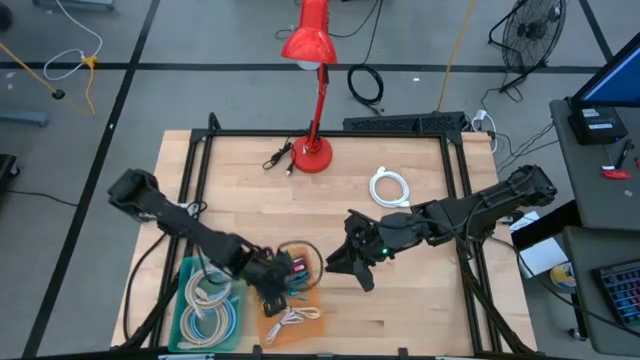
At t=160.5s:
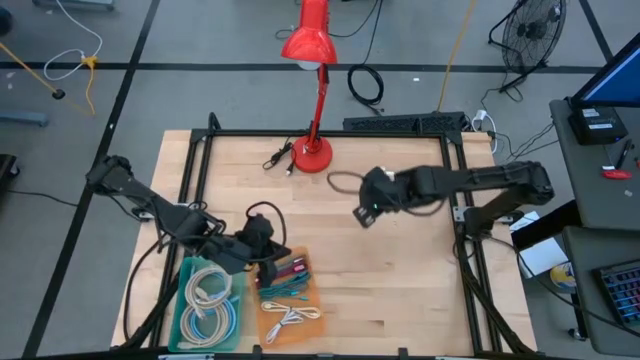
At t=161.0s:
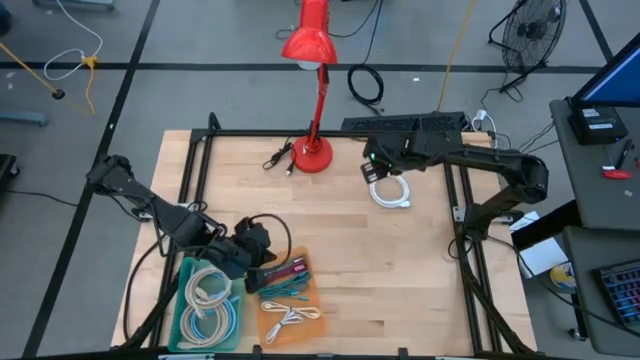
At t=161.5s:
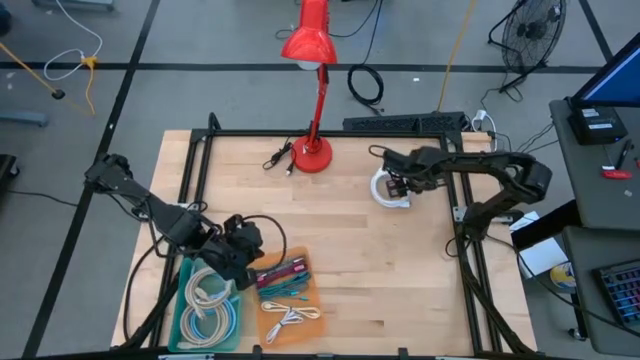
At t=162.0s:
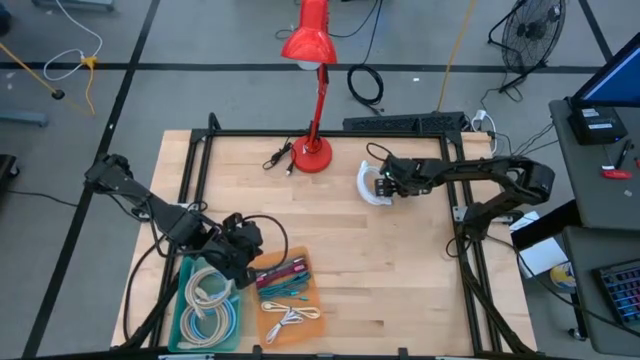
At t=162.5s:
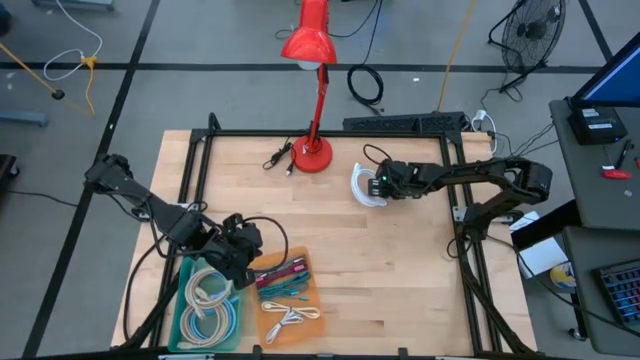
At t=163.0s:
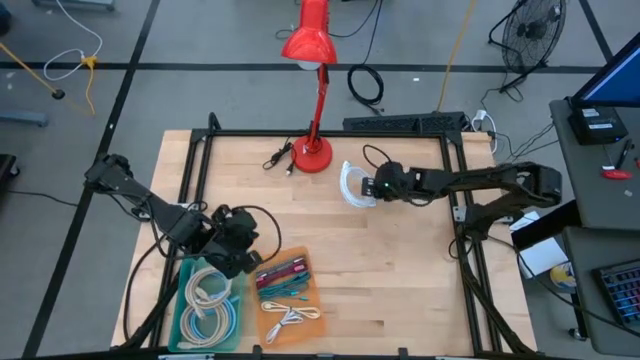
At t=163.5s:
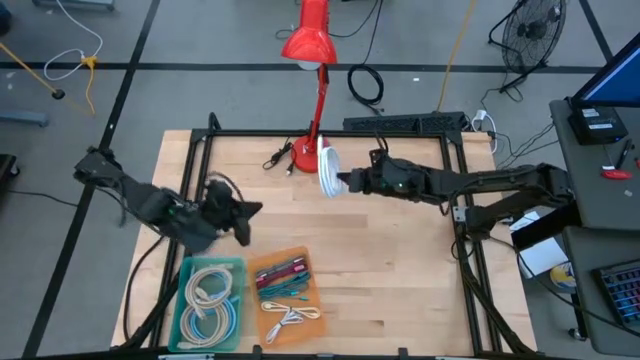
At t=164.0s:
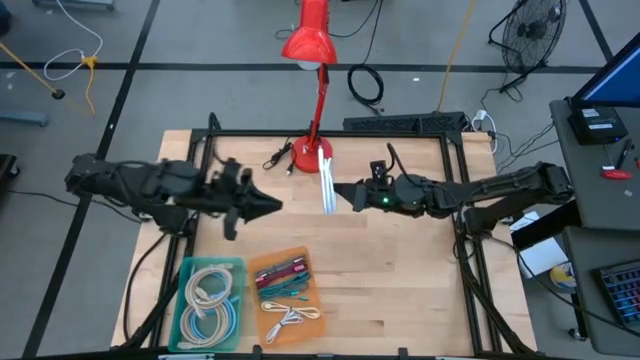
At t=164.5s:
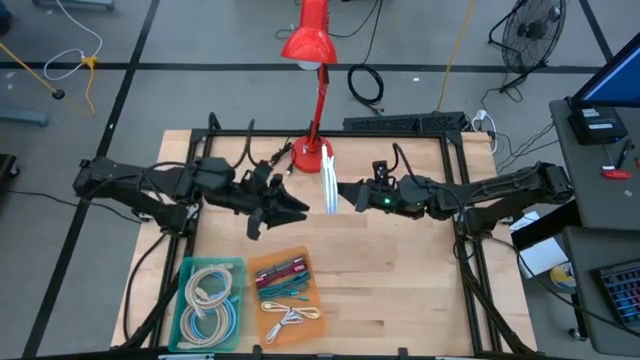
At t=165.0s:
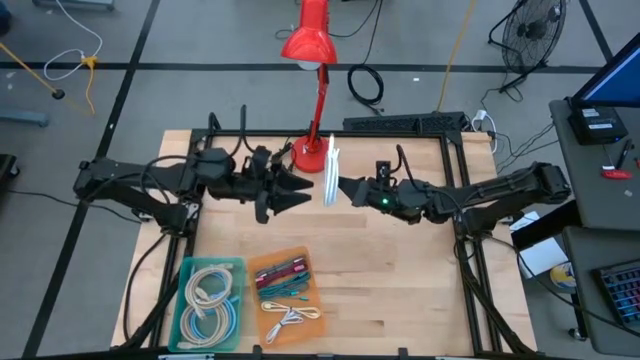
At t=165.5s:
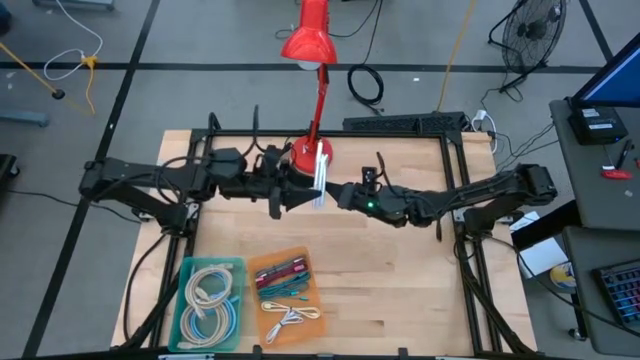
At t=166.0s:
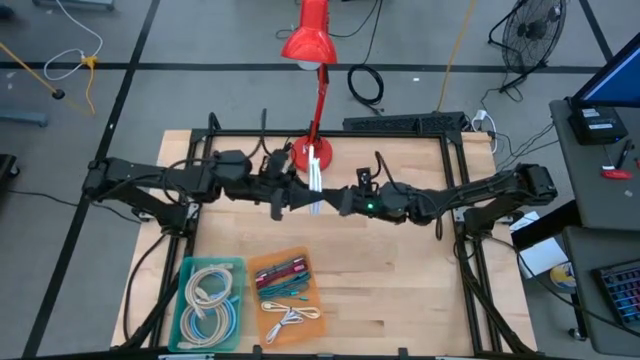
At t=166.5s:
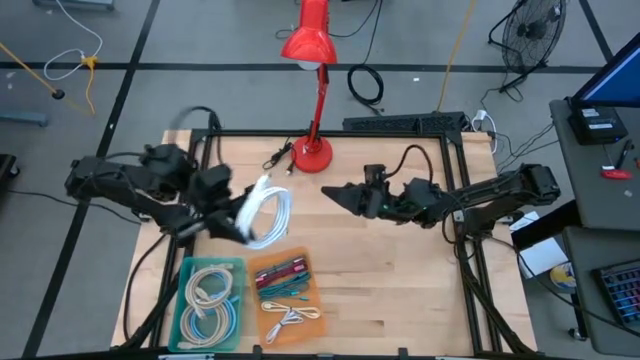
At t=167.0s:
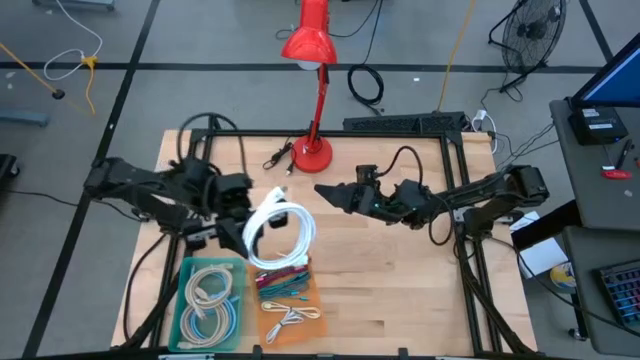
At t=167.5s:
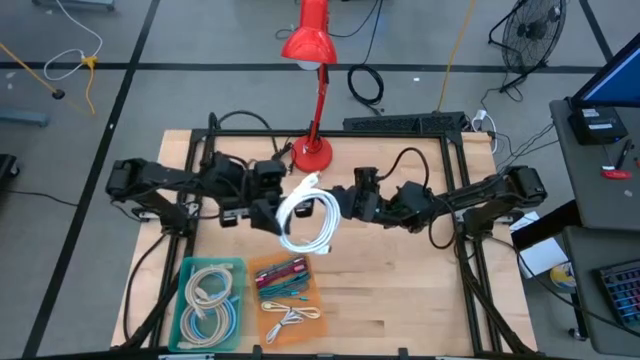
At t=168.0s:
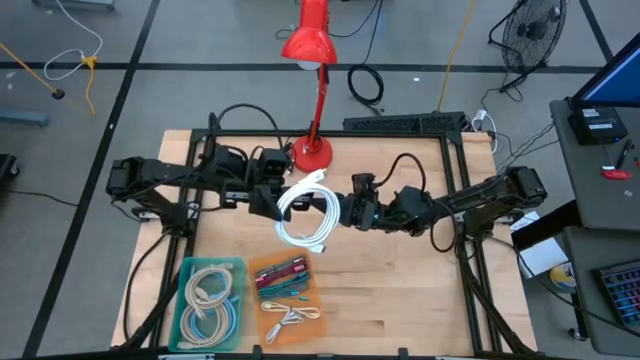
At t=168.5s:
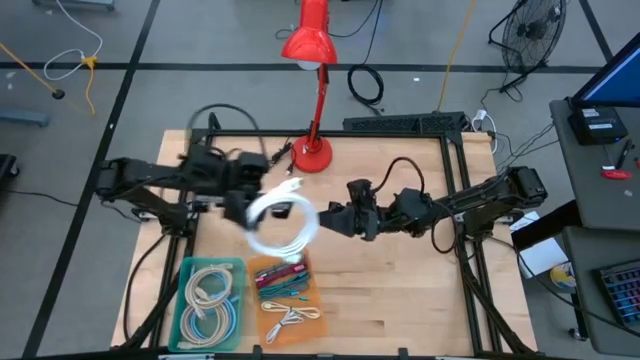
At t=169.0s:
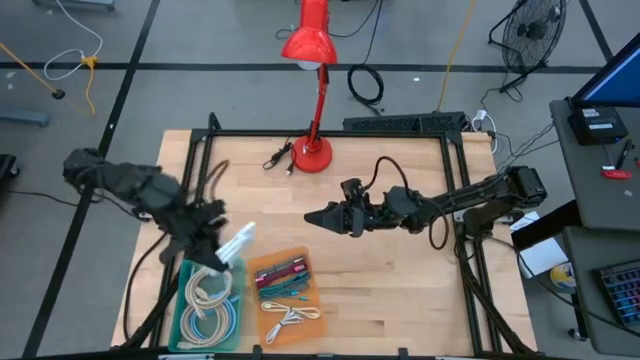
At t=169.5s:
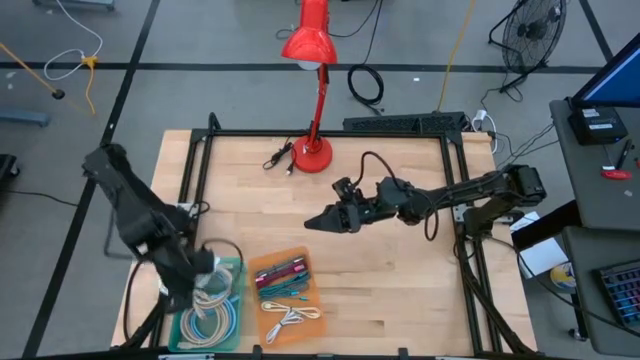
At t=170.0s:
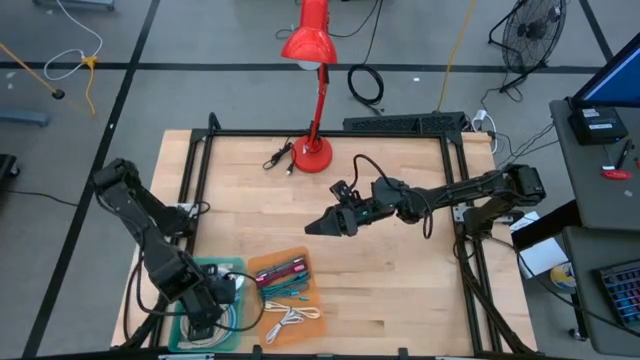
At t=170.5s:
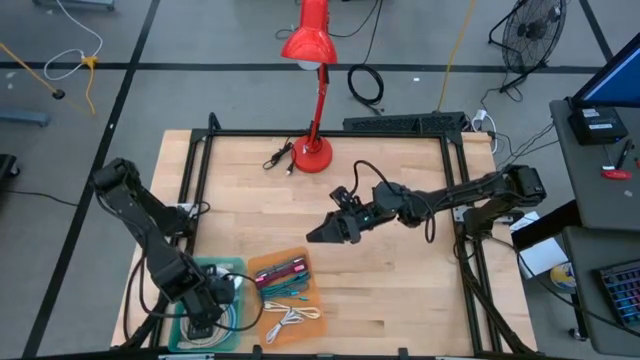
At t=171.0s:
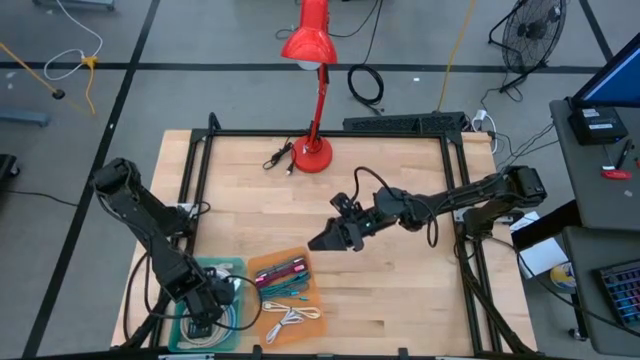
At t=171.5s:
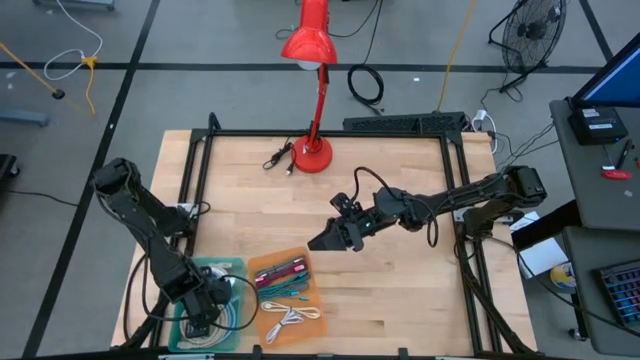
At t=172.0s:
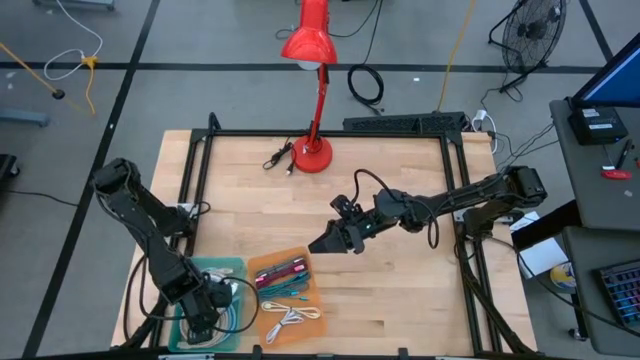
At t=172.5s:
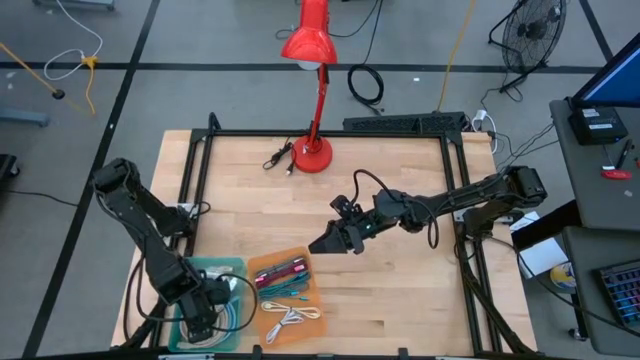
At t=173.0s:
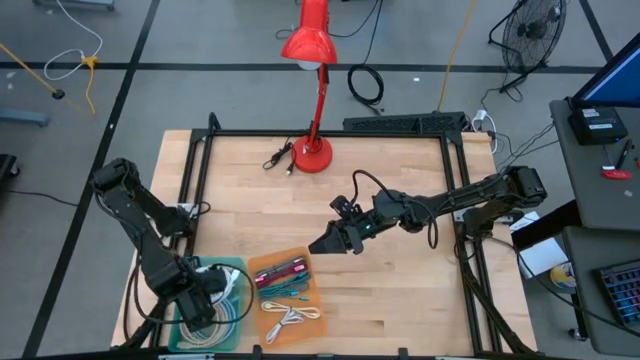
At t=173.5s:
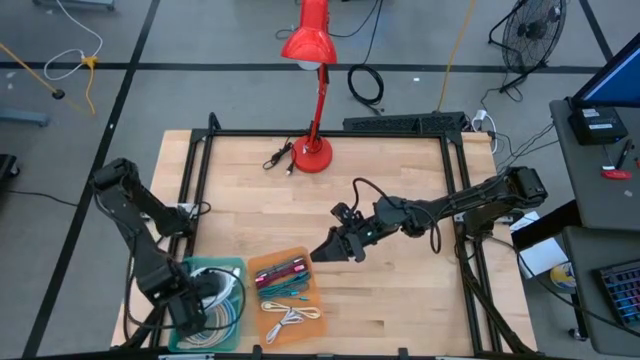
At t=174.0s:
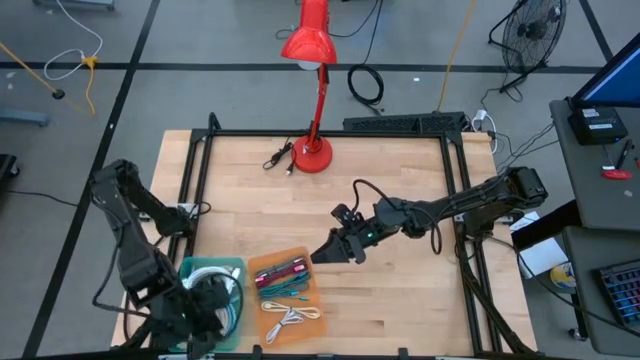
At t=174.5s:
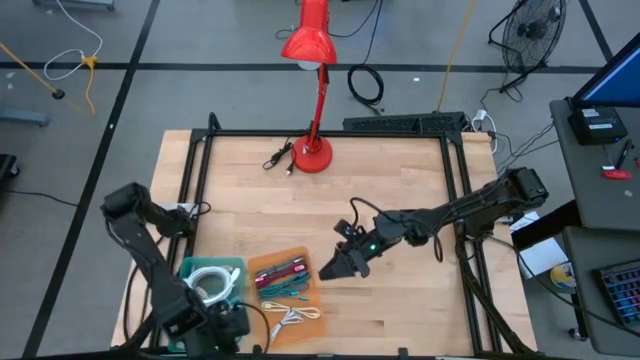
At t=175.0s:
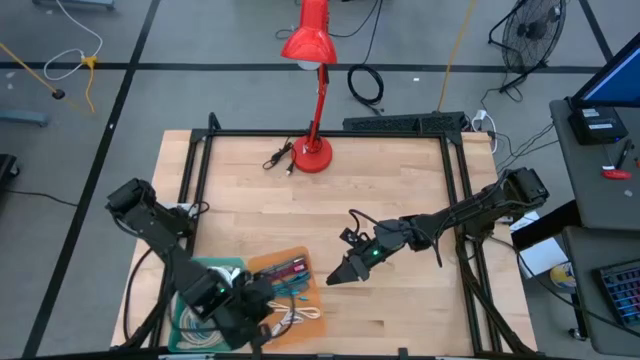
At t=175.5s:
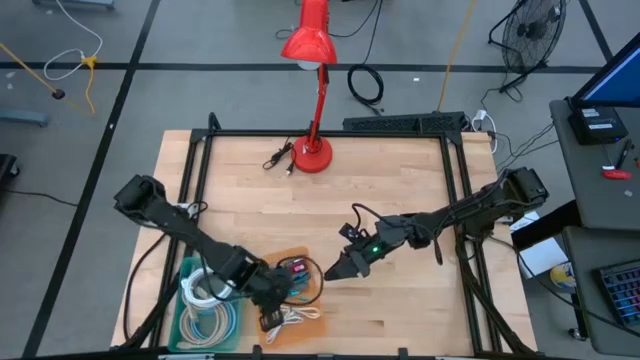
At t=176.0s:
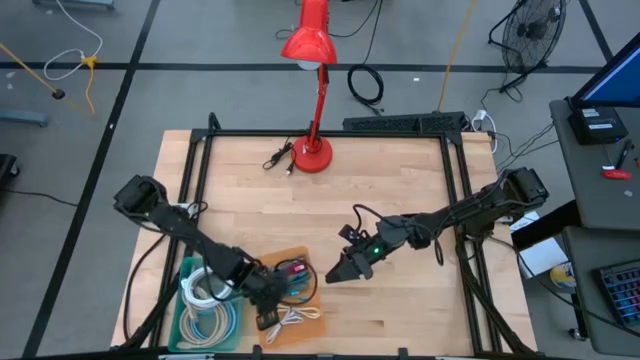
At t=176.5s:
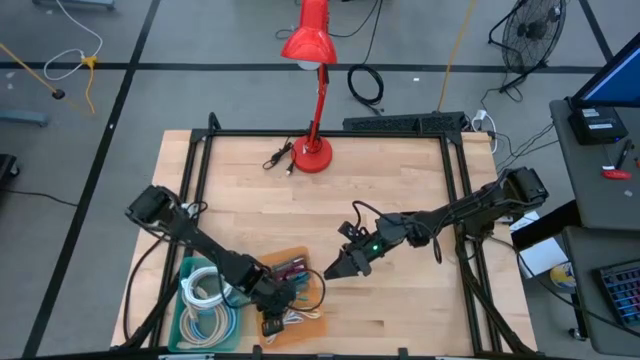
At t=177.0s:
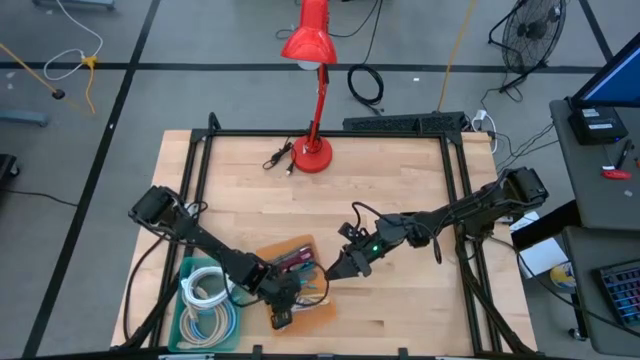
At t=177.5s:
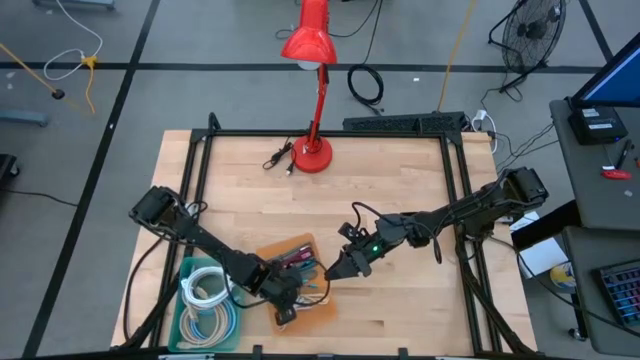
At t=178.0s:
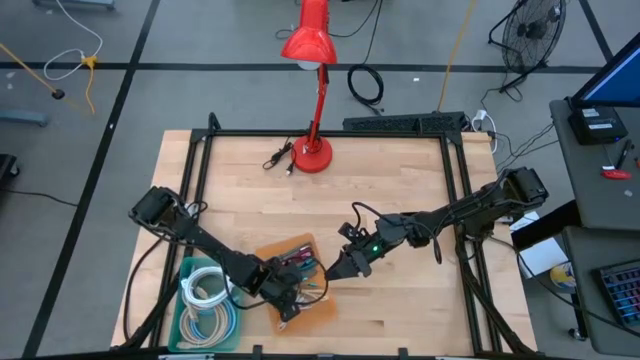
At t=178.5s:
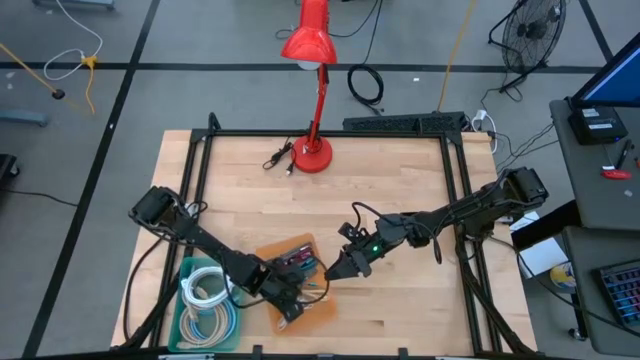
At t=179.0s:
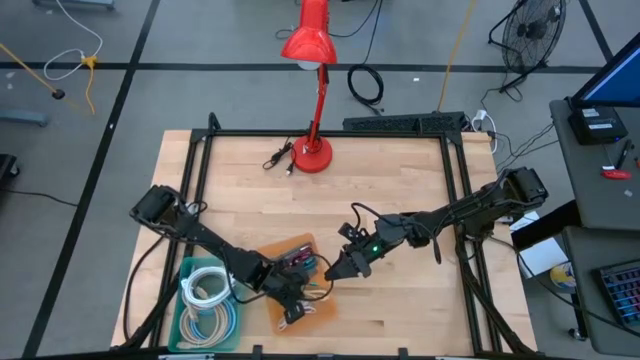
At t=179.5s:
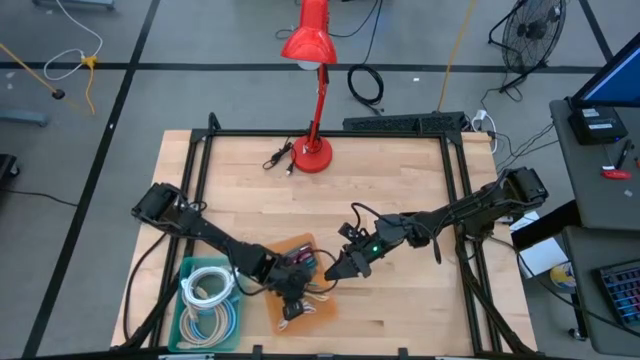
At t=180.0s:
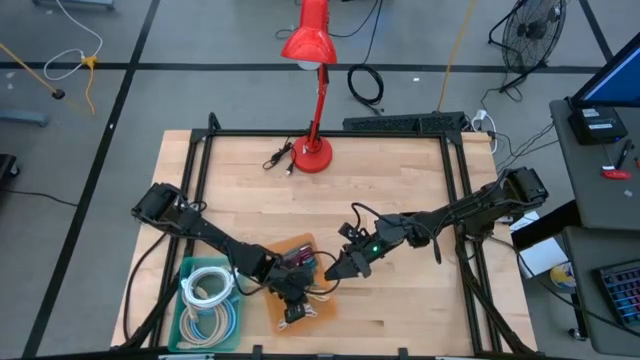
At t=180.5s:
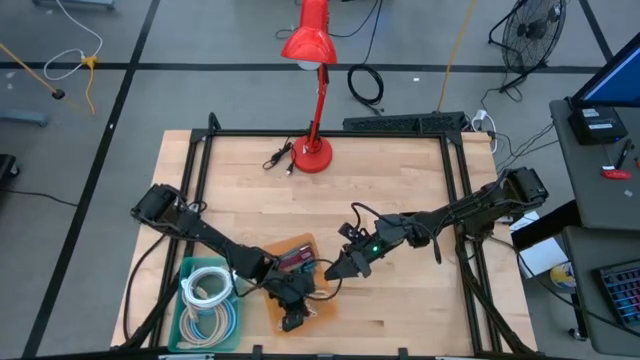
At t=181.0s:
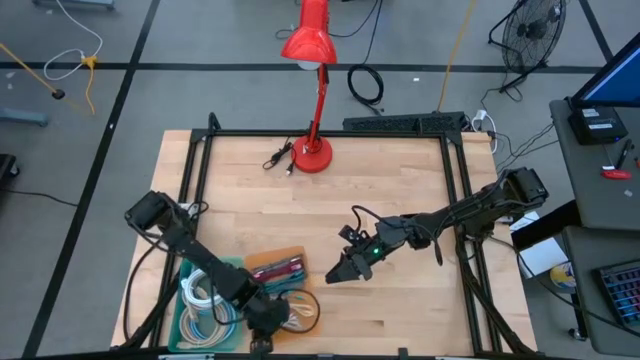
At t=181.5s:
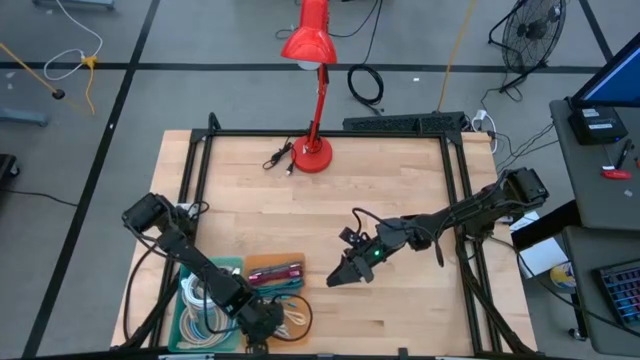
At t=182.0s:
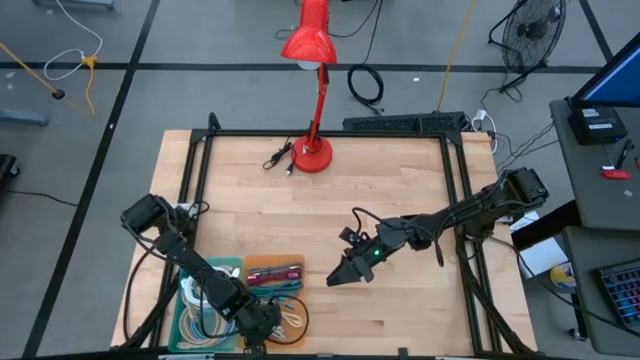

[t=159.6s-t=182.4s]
Task: Pick & Place USB Port
Put the white USB cable into the orange bin
